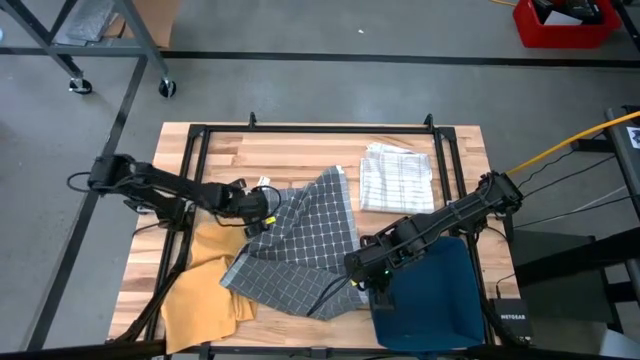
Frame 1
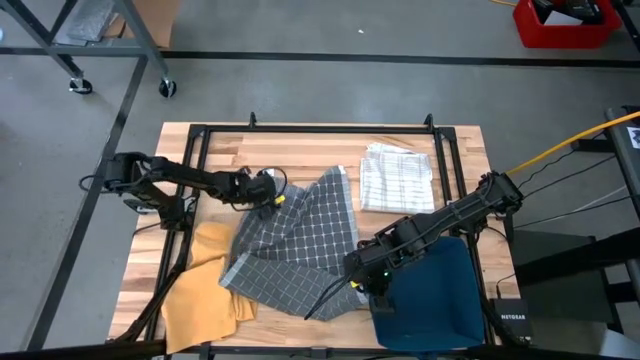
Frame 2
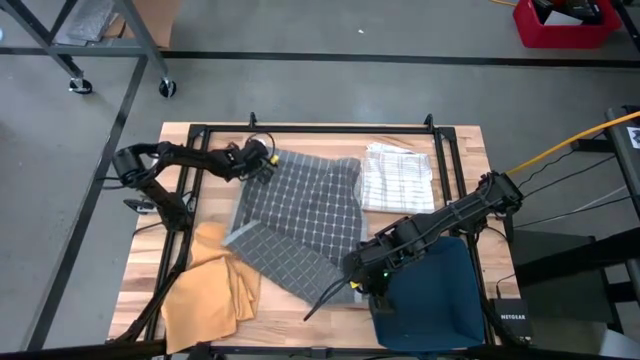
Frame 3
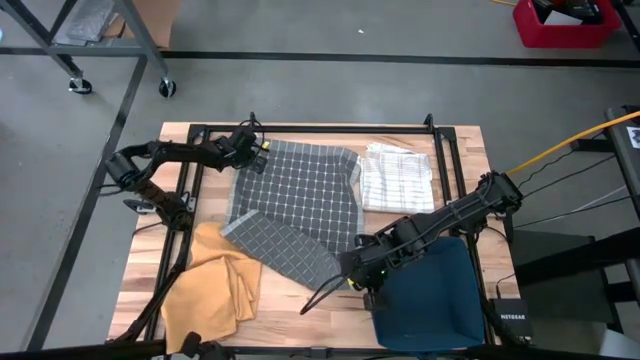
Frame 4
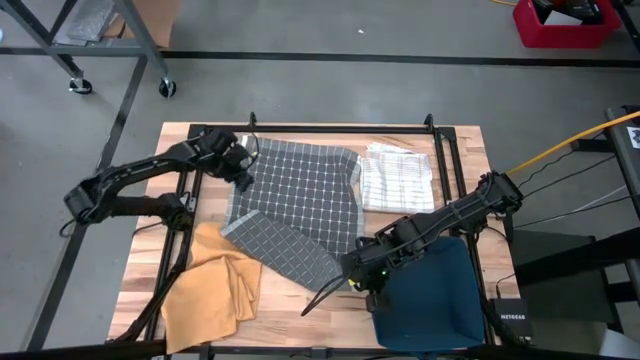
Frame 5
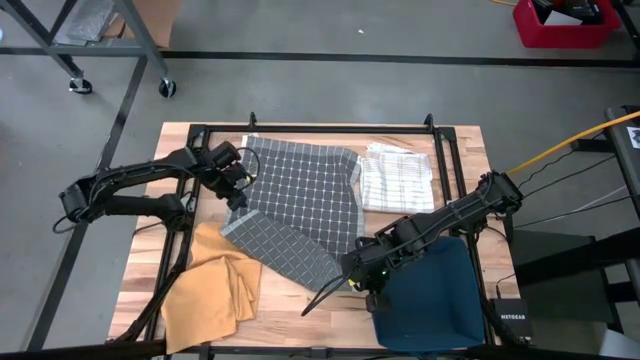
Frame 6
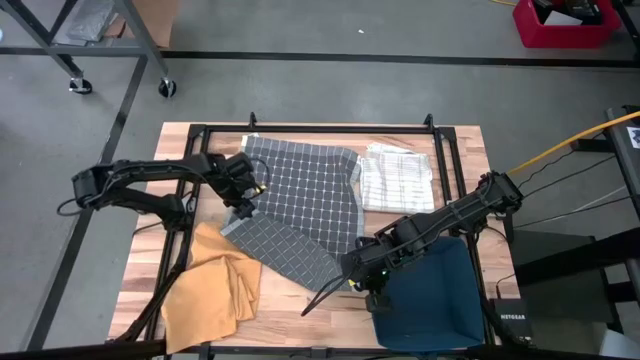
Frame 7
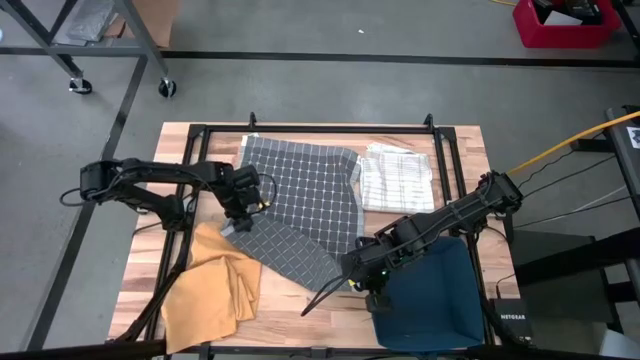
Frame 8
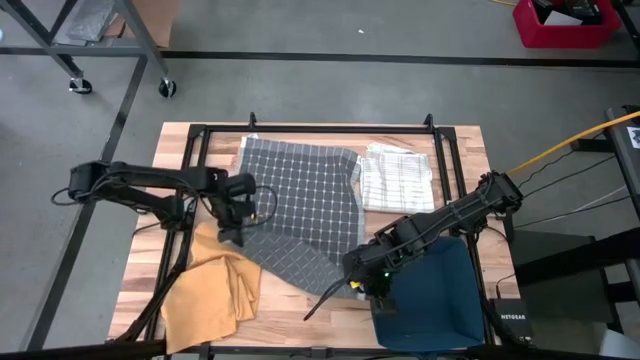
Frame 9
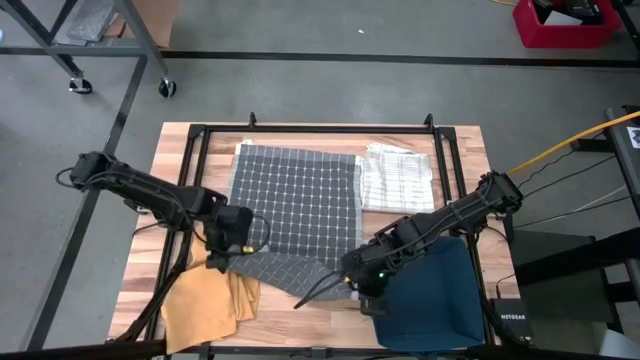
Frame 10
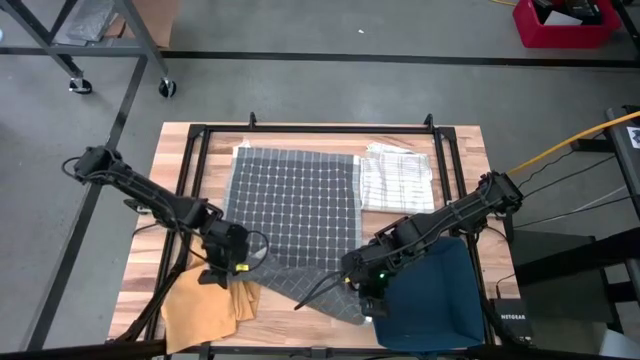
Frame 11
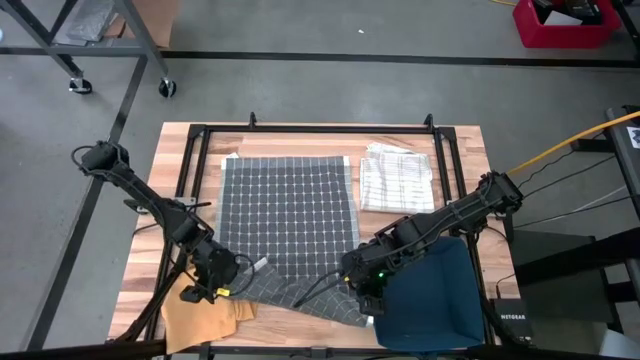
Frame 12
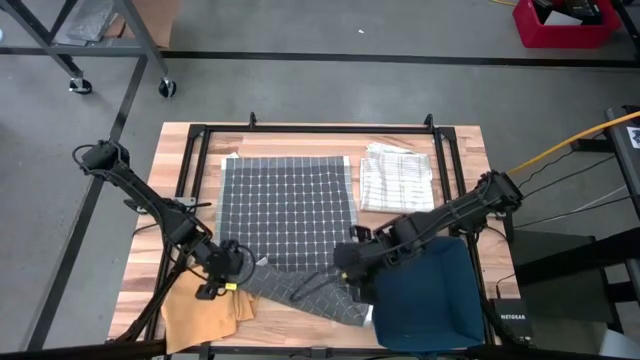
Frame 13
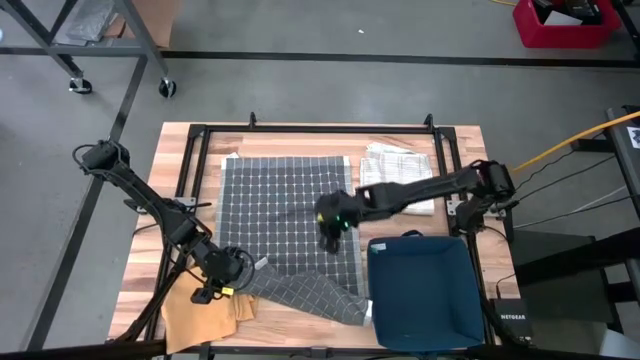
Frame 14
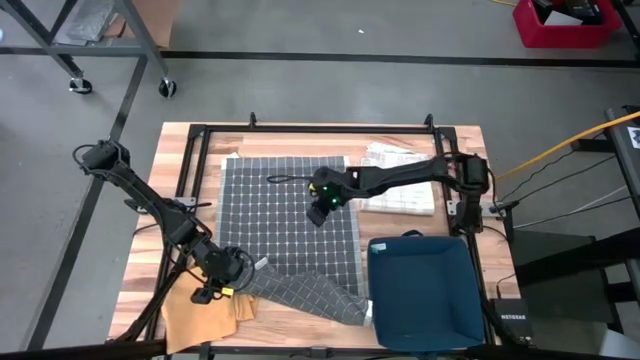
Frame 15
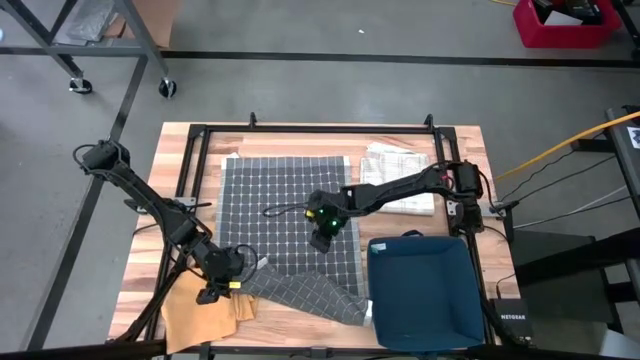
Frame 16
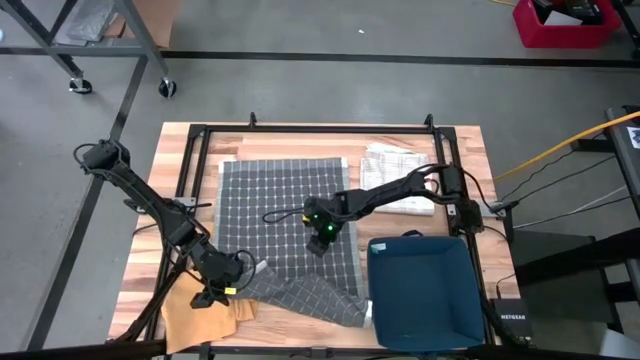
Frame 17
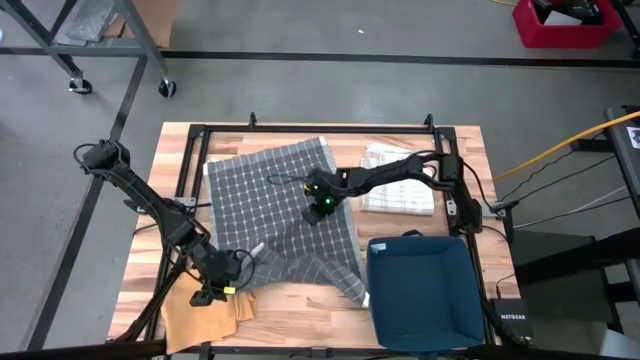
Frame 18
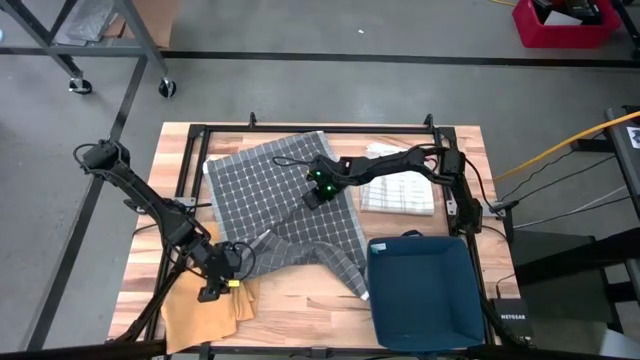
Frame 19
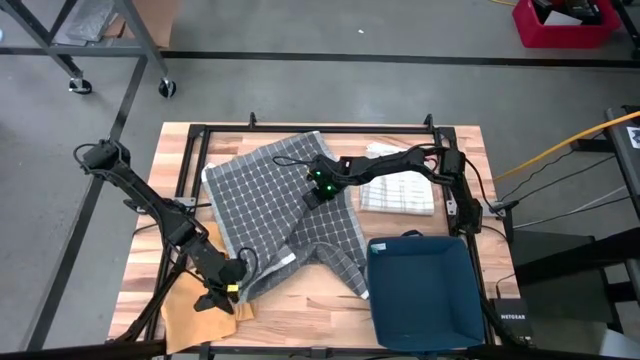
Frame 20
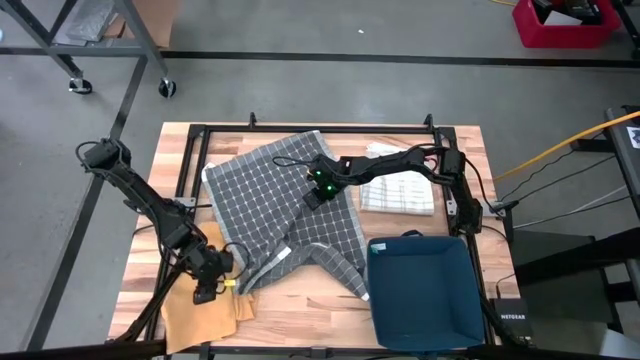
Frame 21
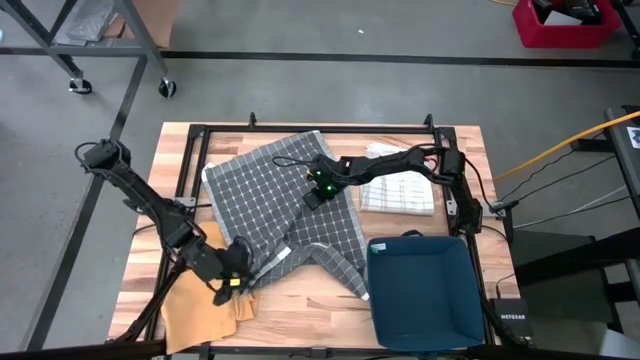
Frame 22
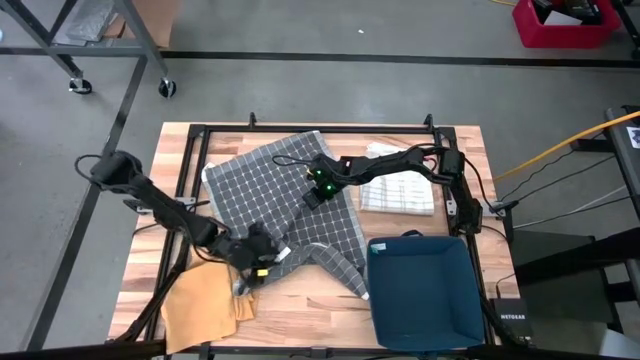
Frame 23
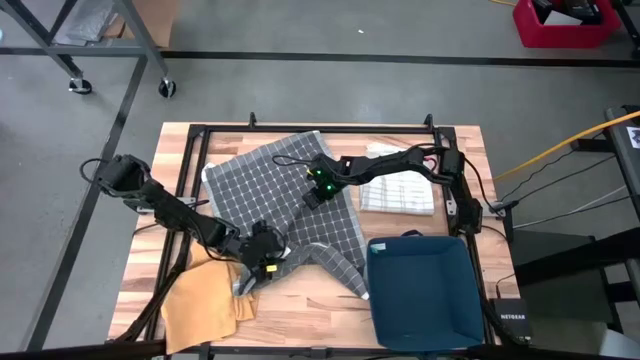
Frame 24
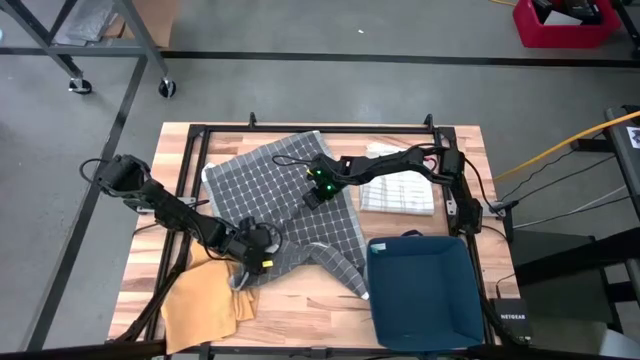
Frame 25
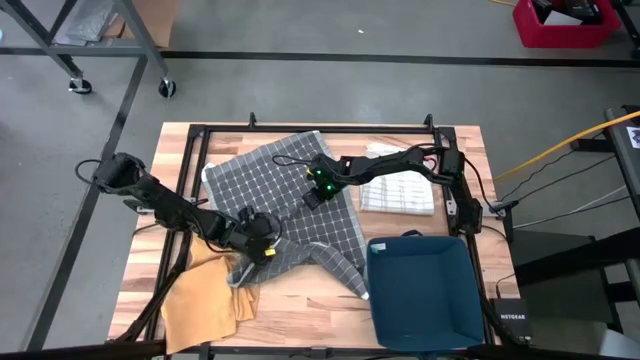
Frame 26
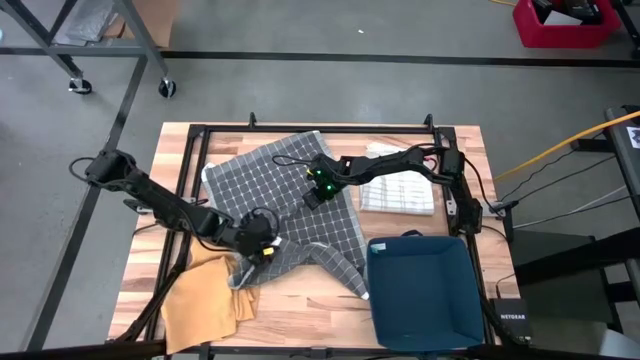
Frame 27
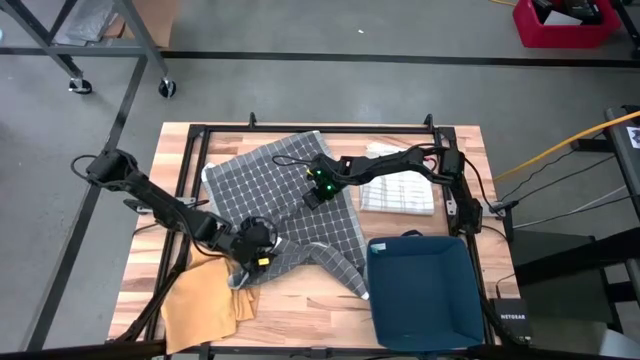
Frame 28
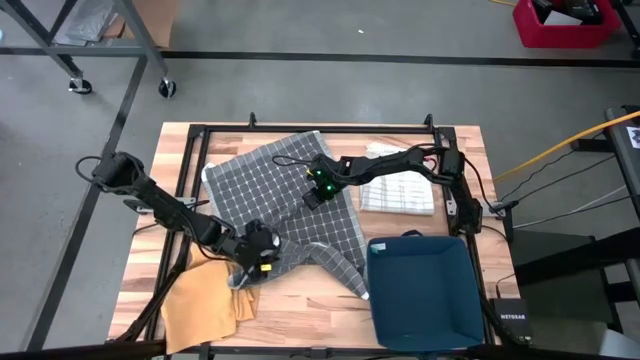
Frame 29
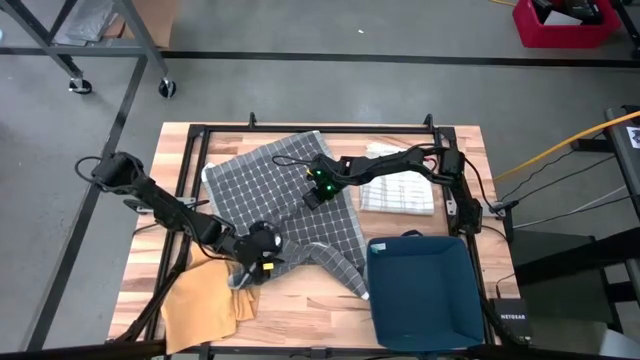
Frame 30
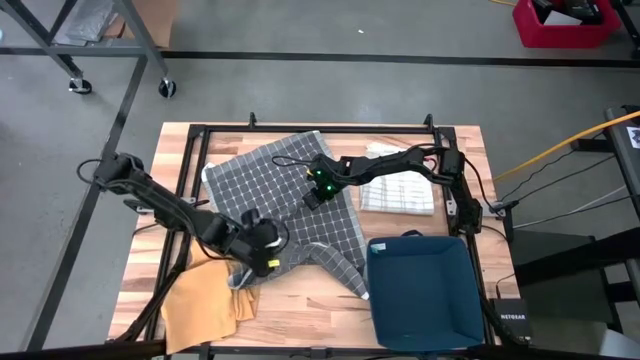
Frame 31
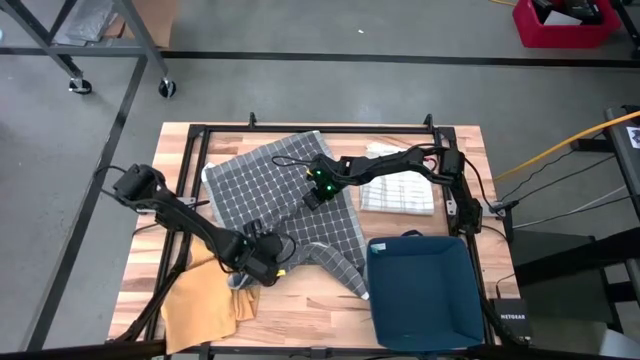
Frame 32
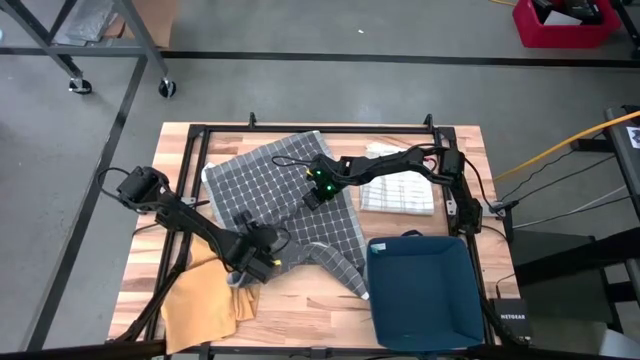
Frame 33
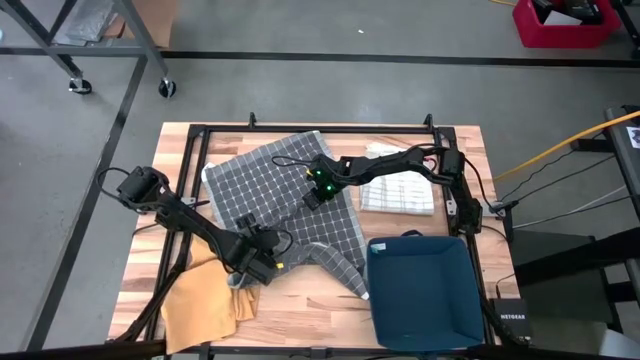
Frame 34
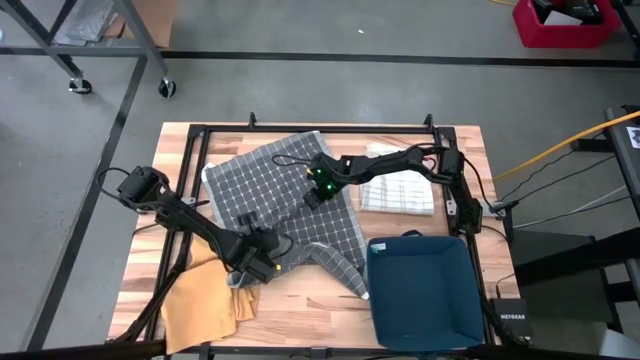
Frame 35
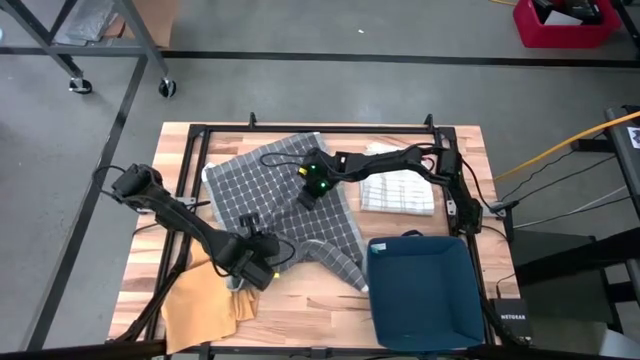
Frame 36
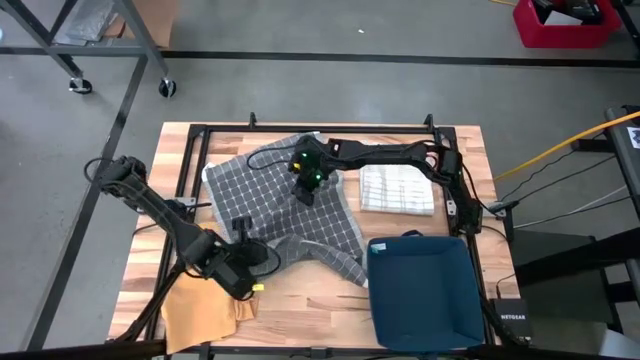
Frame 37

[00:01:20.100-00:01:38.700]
Task: Fold towel
Fold the gray towel
